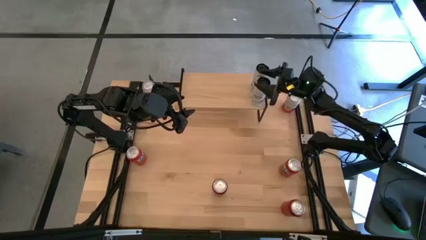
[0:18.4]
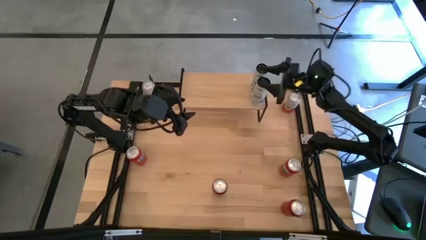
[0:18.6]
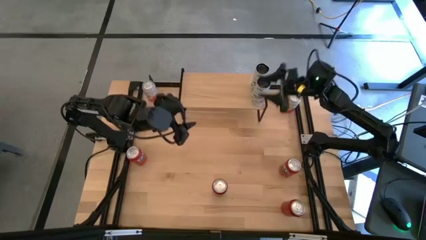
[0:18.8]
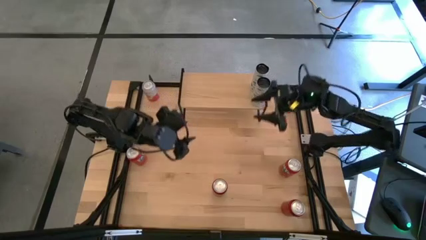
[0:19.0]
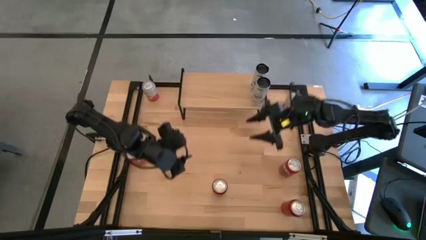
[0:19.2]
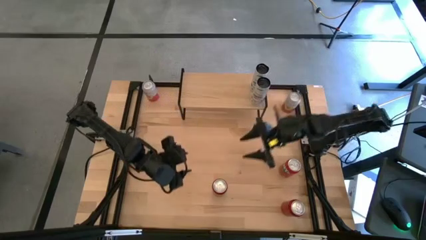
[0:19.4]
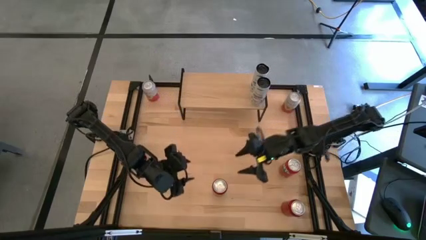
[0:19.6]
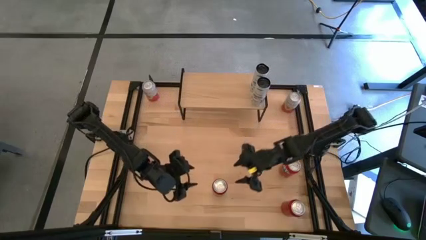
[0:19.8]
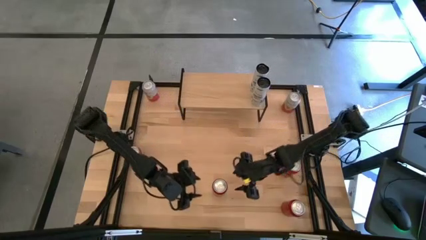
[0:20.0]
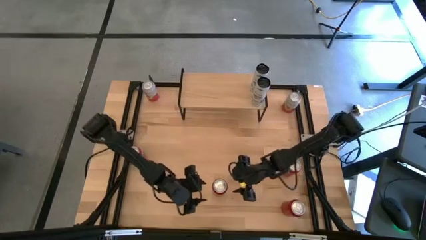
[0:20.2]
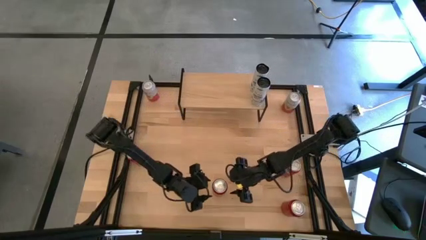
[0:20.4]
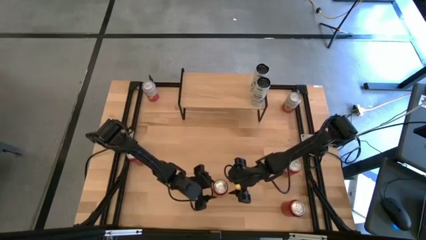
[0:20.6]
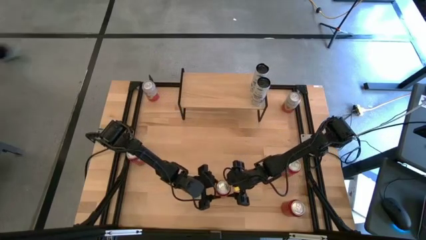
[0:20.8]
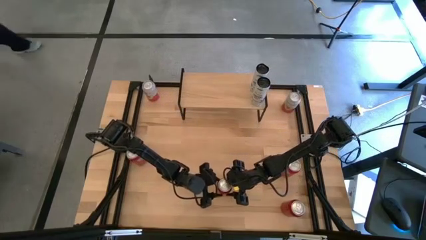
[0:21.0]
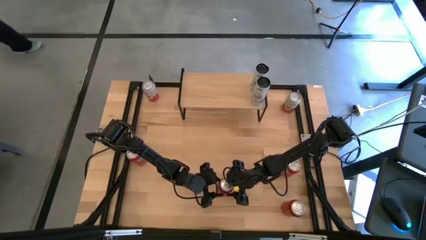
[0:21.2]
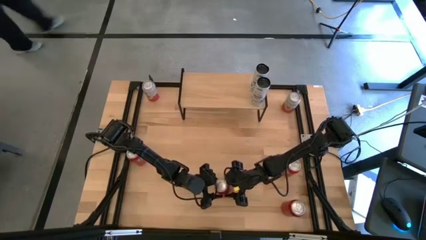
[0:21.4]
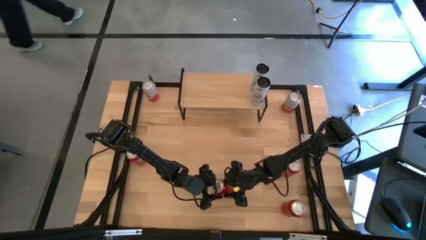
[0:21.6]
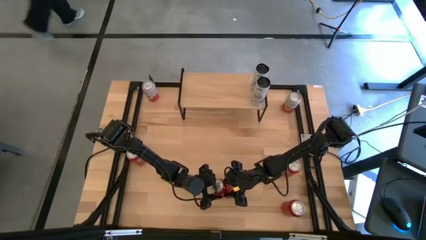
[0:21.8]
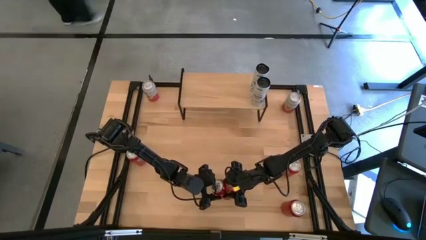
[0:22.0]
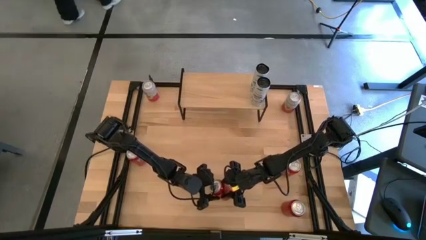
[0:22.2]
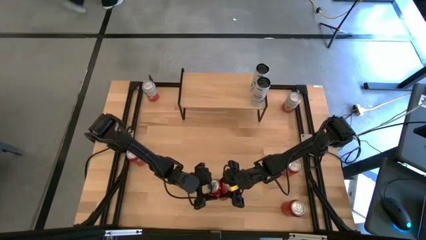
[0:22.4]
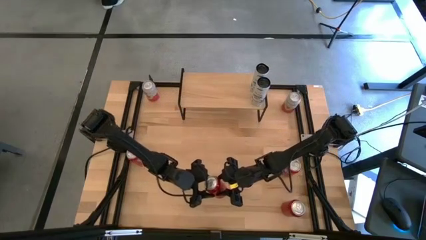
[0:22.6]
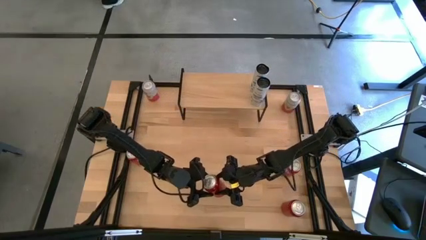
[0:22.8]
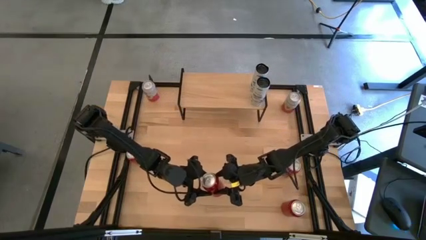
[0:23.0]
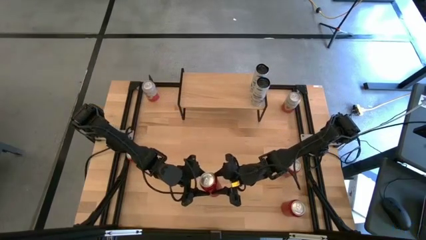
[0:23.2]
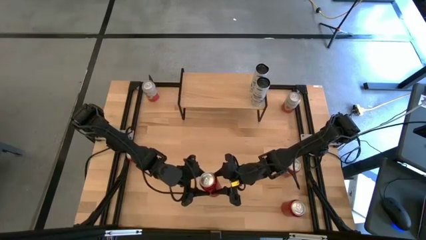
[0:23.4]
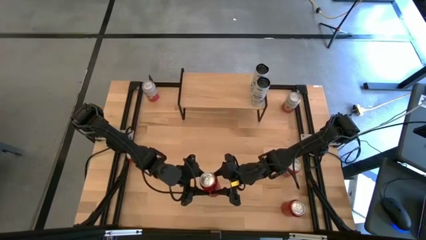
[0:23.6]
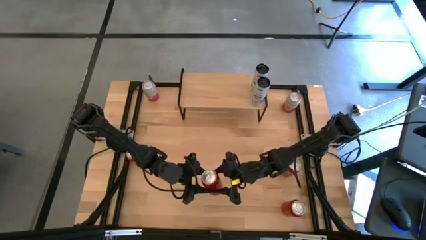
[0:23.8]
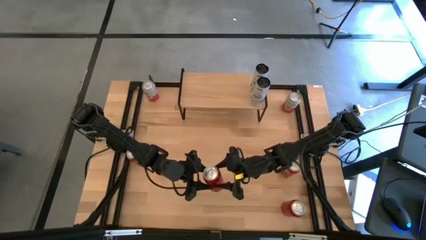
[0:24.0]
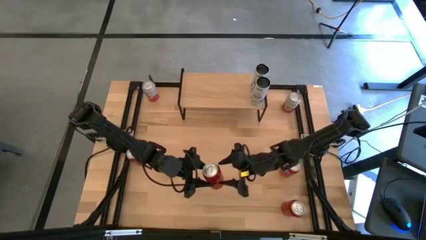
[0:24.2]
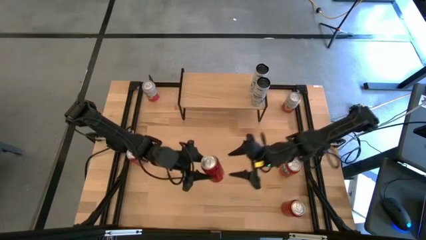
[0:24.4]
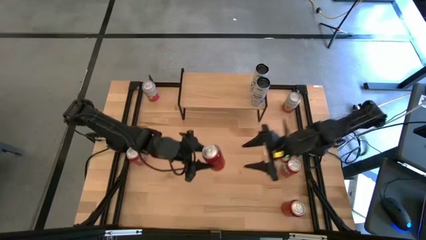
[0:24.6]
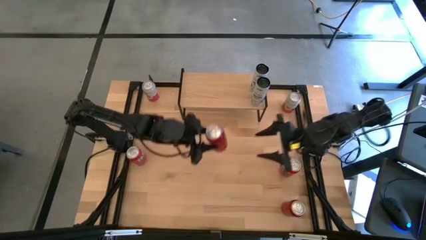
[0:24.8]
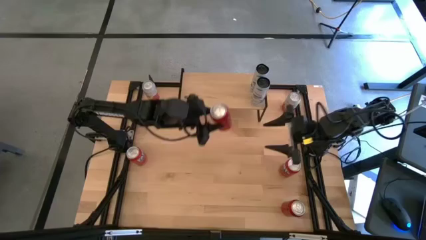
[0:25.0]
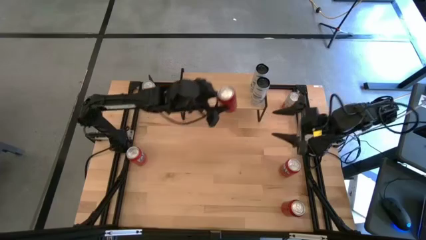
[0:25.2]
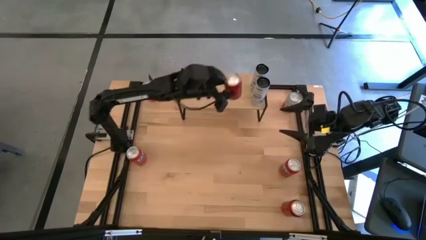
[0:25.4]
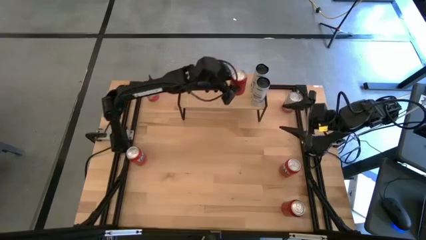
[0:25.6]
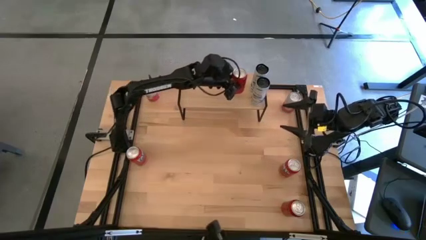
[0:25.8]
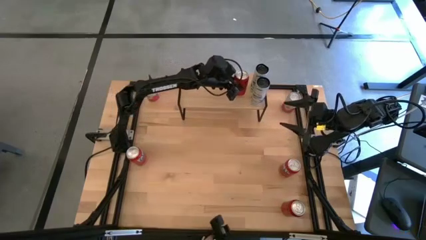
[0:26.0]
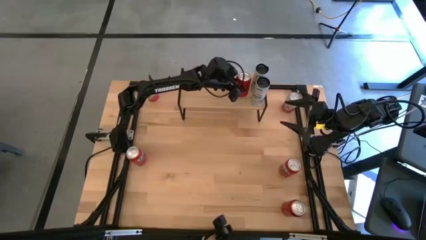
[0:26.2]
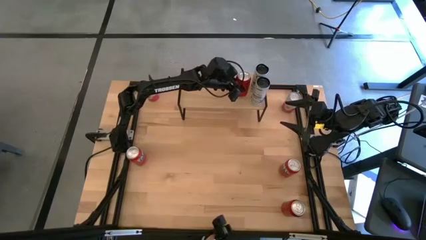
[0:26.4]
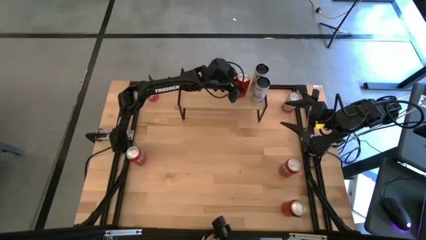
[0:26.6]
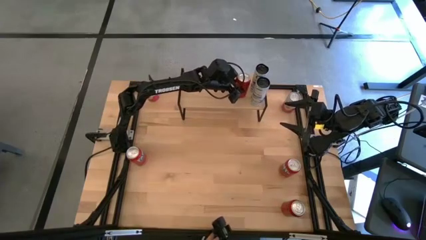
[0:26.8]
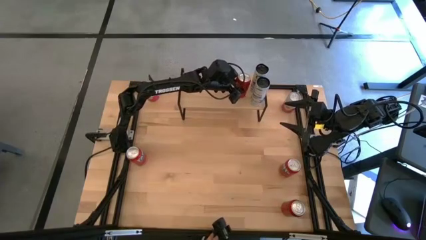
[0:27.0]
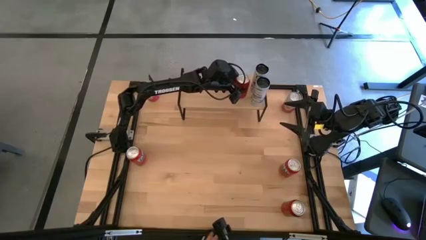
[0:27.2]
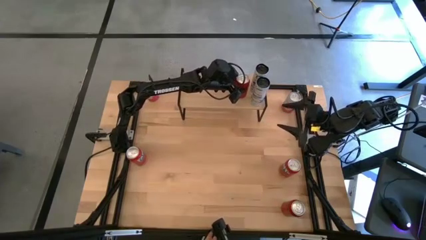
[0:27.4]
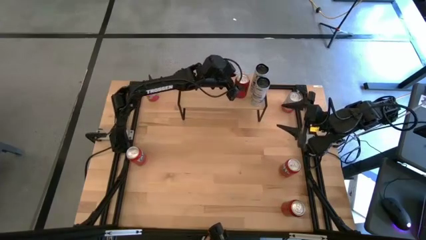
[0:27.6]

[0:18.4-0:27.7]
Task: Place canned beverage on shelf
Put the left red-black soda can on the shelf

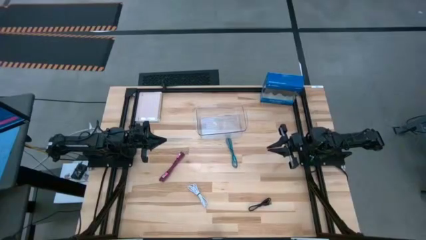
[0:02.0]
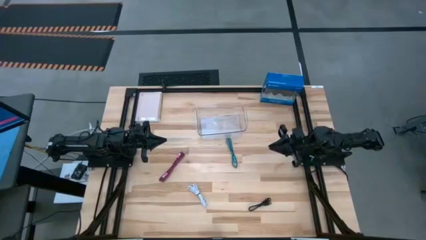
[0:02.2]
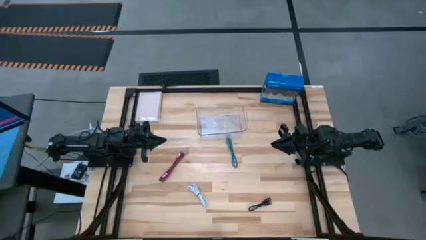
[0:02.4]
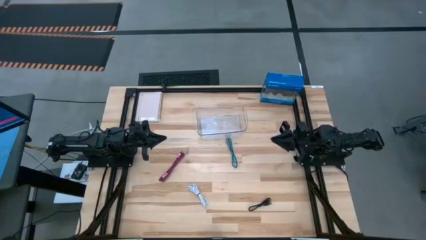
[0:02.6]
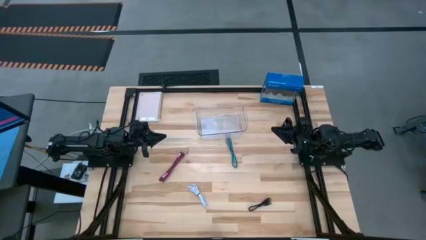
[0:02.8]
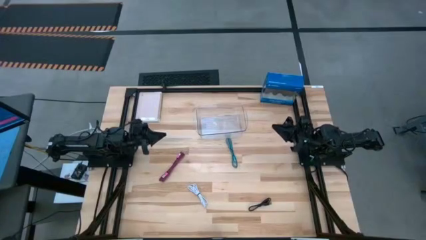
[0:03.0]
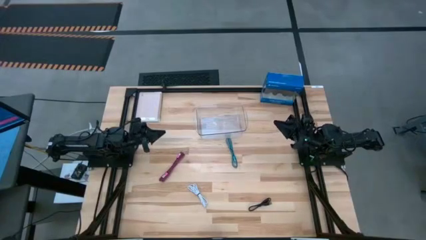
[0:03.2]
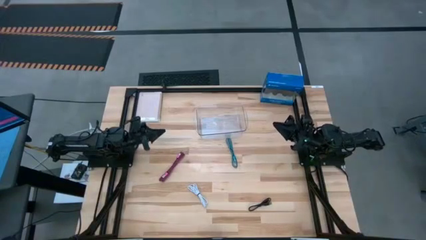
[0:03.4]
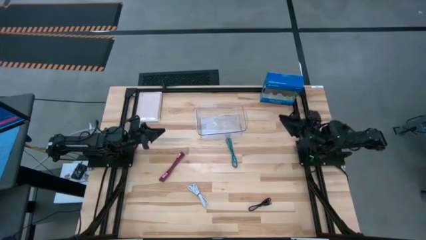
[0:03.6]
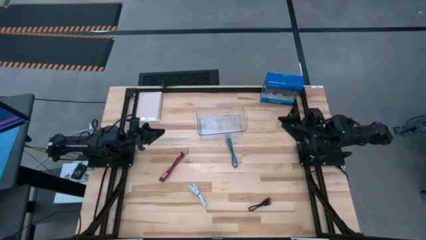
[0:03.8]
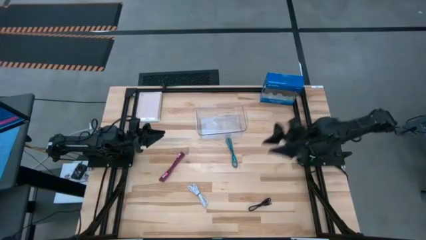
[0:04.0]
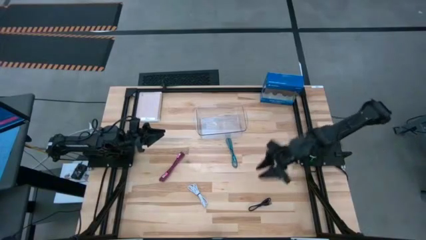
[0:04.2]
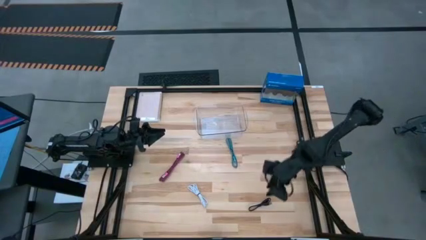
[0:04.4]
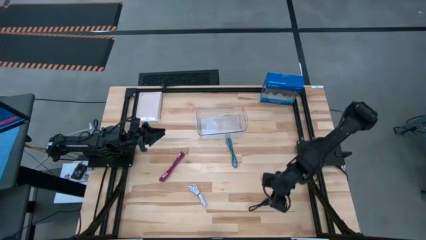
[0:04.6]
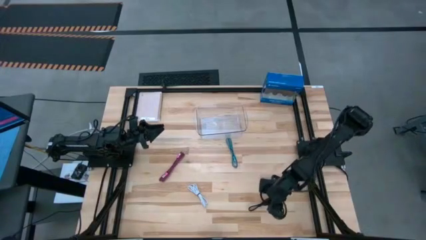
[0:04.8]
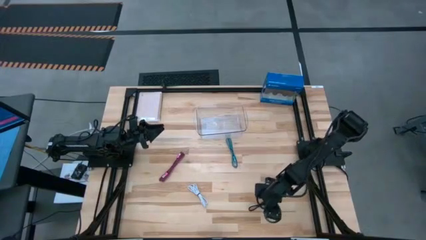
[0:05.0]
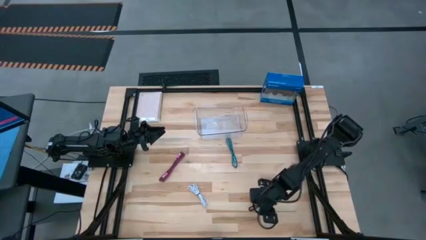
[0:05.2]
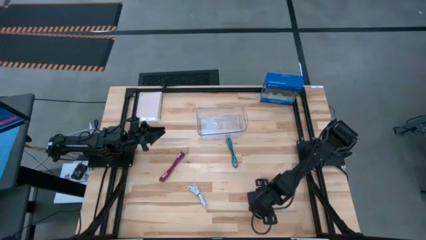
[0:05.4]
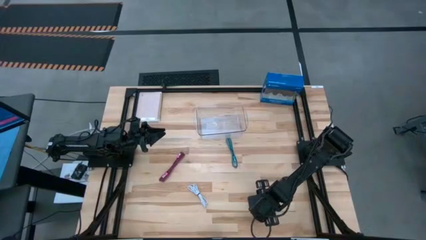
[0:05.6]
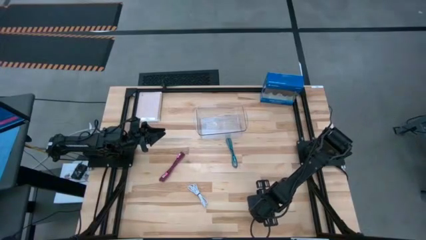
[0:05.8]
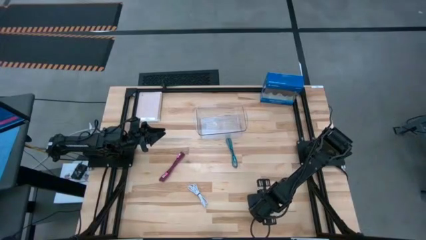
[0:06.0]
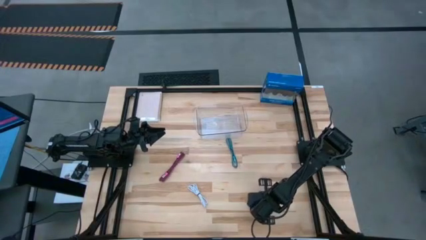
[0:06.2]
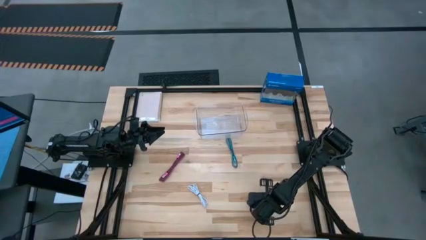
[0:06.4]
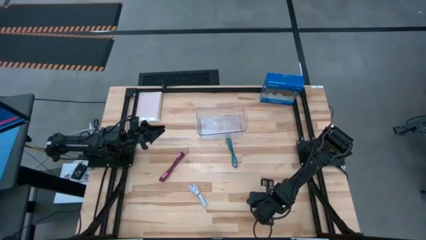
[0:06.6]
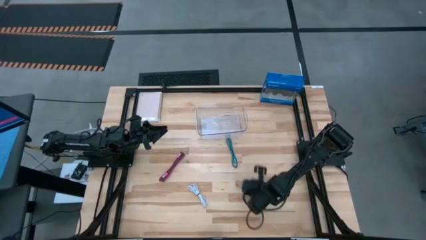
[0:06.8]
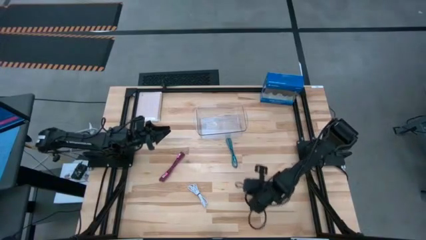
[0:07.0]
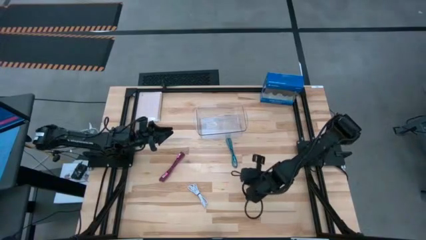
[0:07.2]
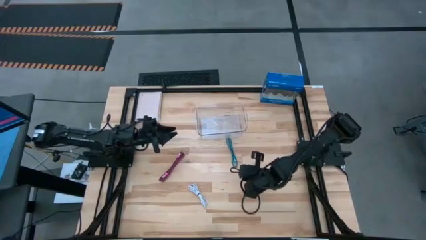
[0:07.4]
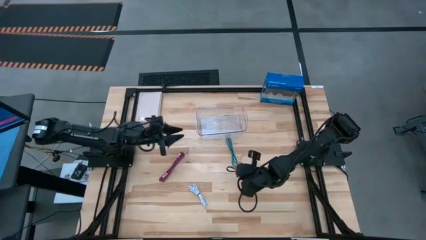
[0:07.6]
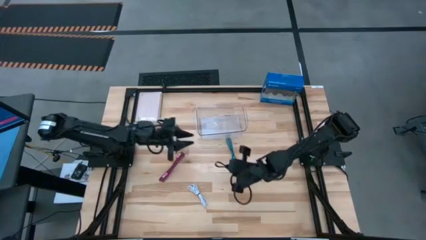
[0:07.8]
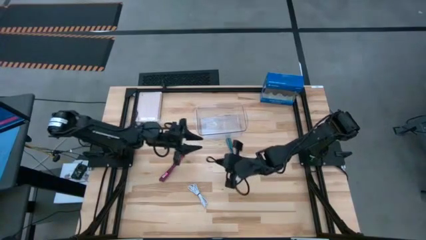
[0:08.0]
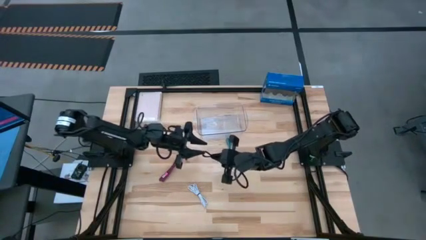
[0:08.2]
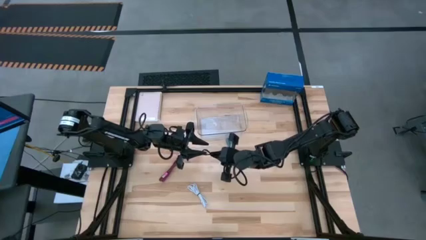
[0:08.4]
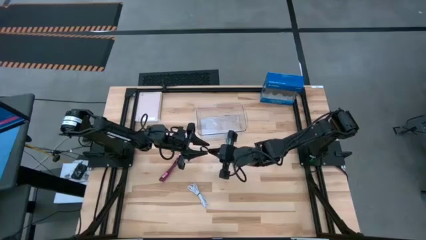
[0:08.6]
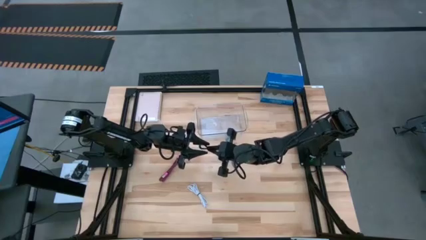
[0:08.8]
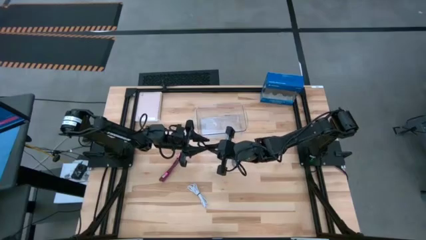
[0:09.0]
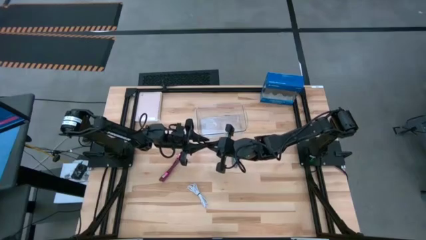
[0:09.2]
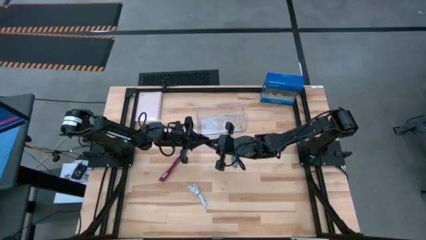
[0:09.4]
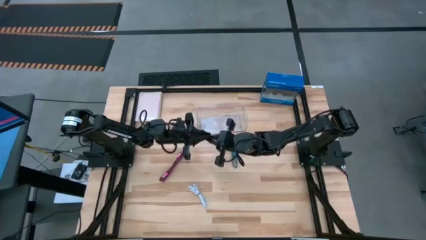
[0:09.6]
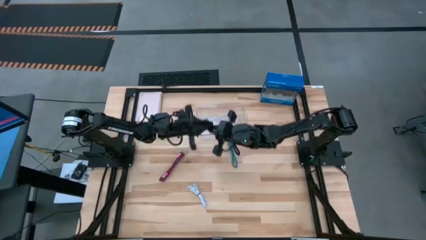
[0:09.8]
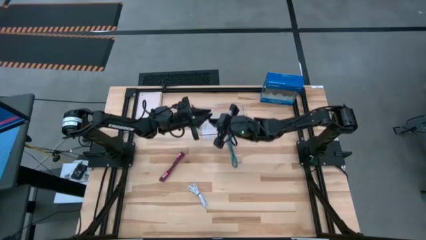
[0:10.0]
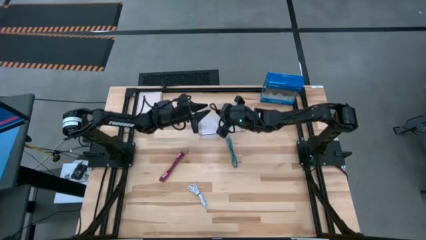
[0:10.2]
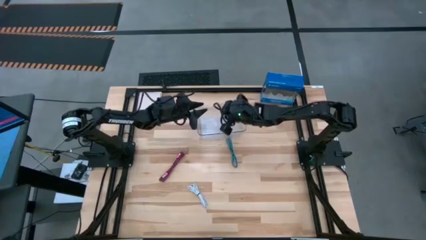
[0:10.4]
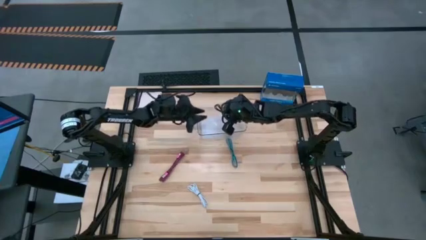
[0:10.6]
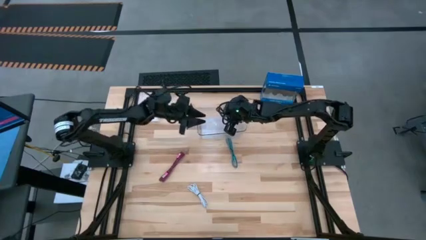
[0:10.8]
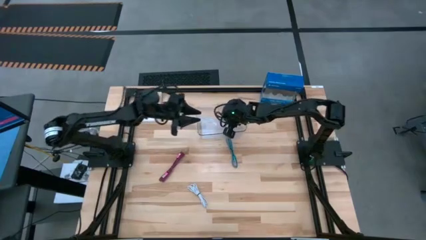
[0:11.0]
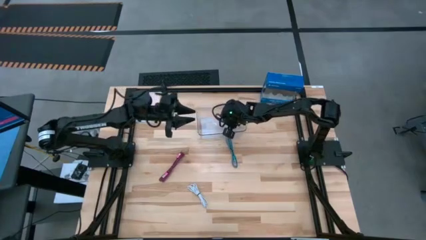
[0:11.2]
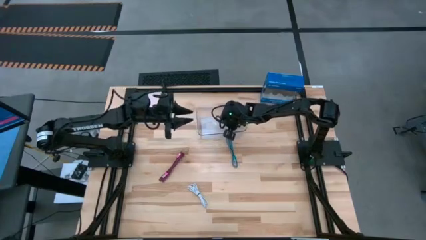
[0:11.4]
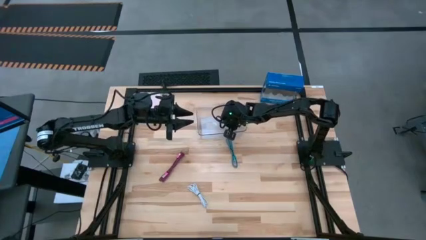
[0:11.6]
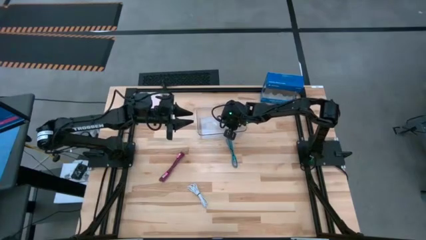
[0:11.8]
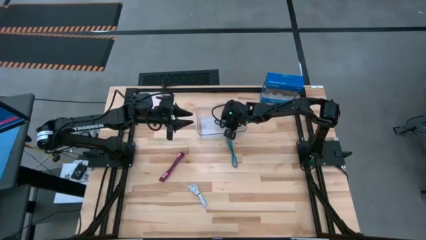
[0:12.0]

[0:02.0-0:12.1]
Task: Pick and place USB-C Cables
Put the black charger cable into the transparent bin
